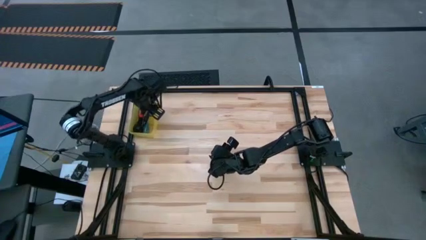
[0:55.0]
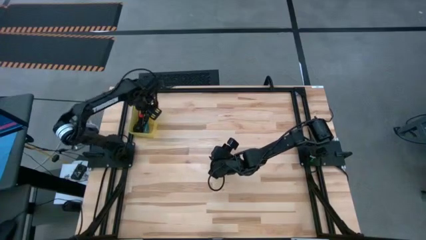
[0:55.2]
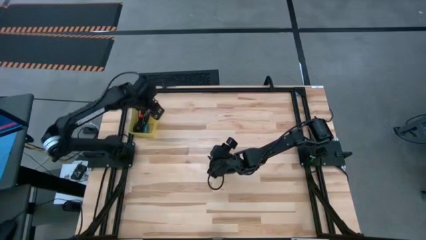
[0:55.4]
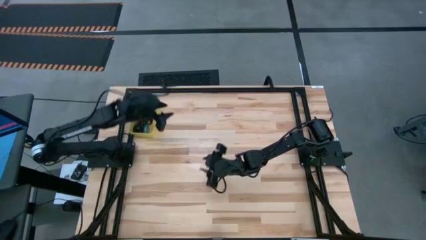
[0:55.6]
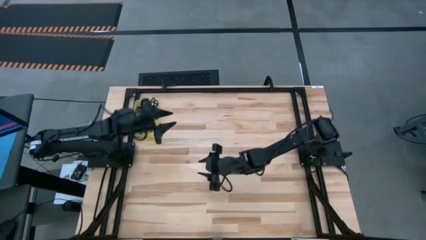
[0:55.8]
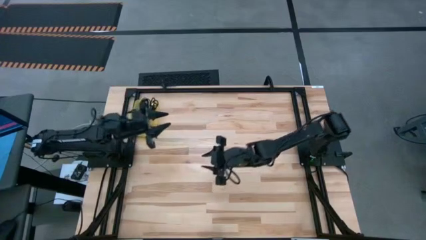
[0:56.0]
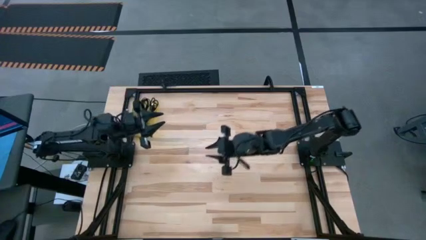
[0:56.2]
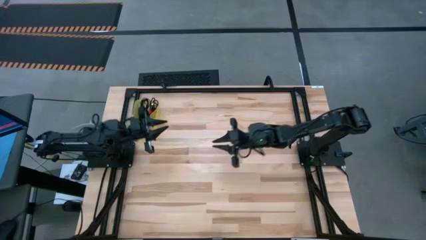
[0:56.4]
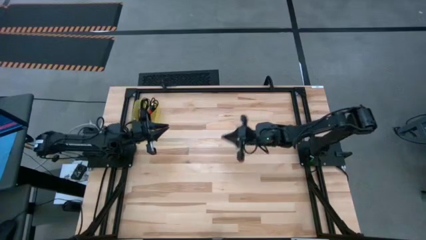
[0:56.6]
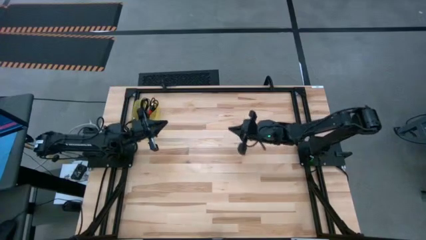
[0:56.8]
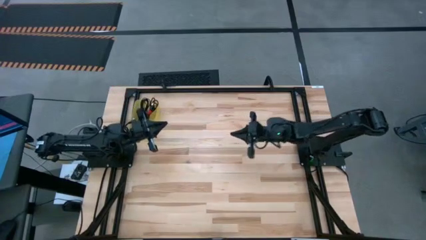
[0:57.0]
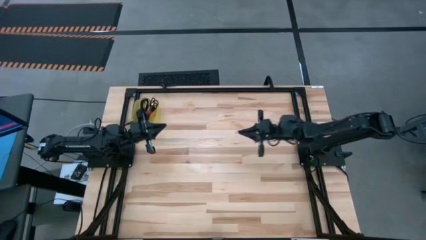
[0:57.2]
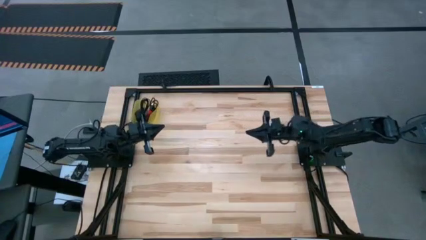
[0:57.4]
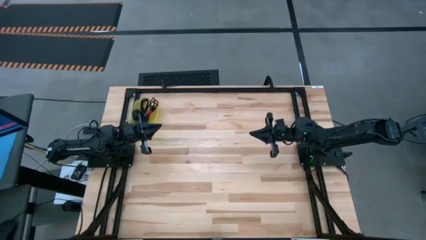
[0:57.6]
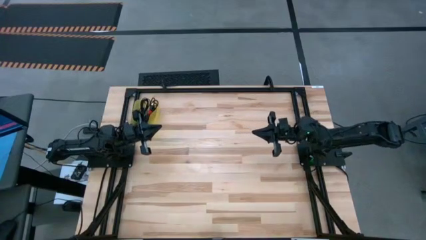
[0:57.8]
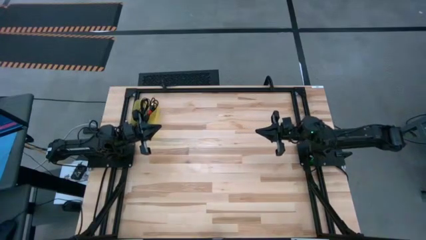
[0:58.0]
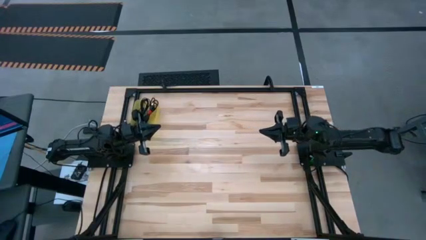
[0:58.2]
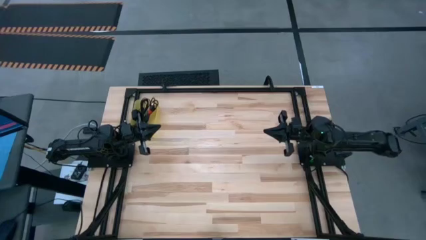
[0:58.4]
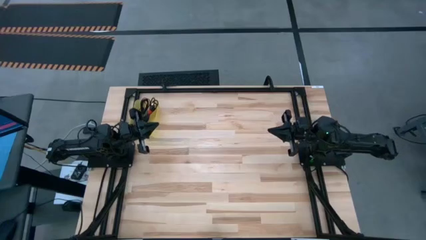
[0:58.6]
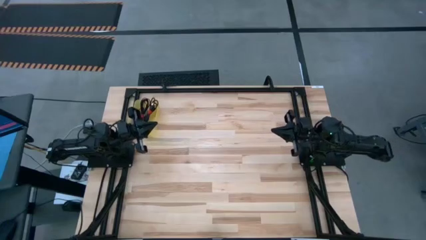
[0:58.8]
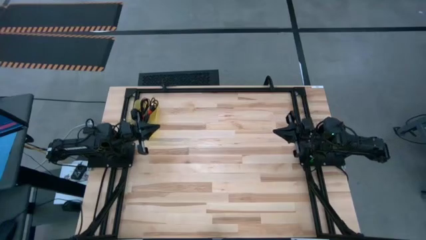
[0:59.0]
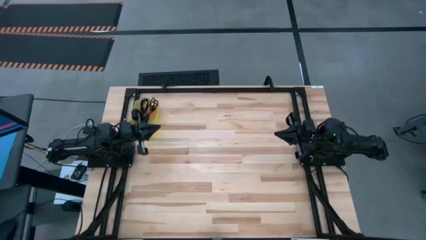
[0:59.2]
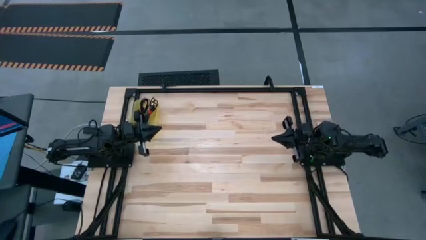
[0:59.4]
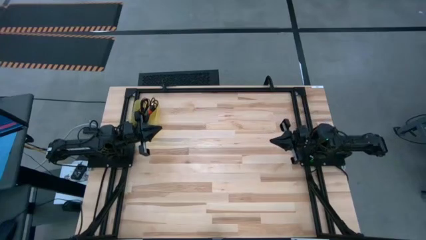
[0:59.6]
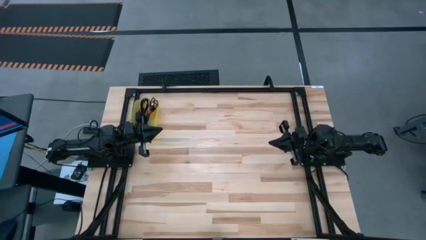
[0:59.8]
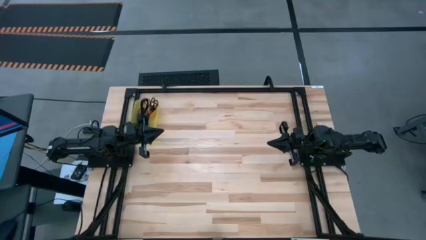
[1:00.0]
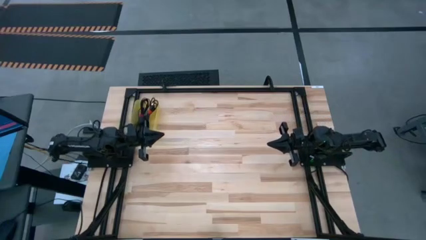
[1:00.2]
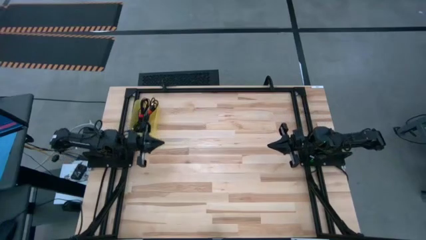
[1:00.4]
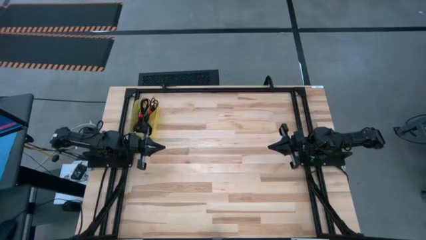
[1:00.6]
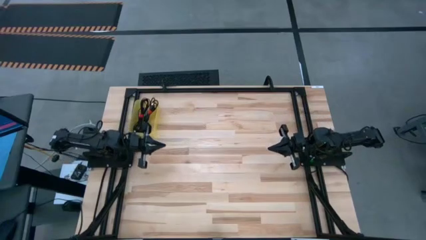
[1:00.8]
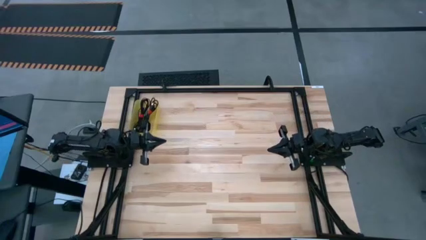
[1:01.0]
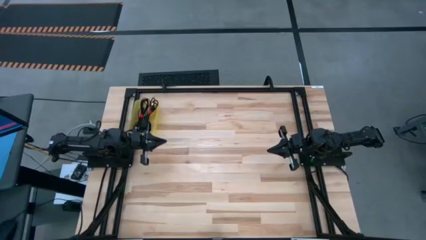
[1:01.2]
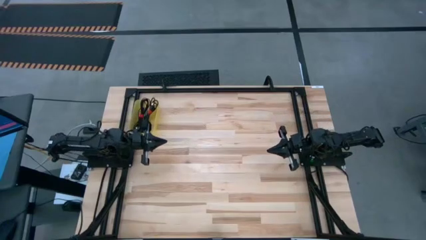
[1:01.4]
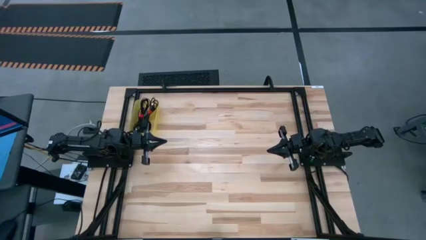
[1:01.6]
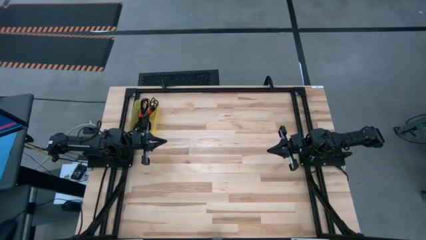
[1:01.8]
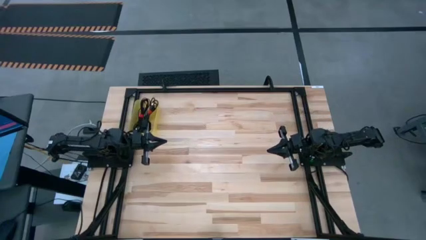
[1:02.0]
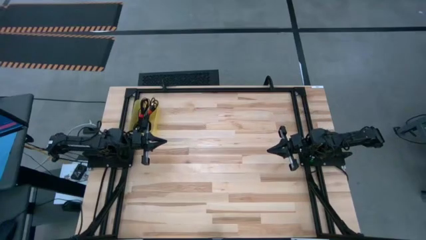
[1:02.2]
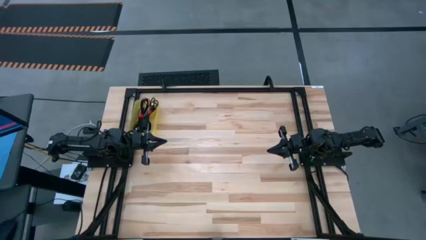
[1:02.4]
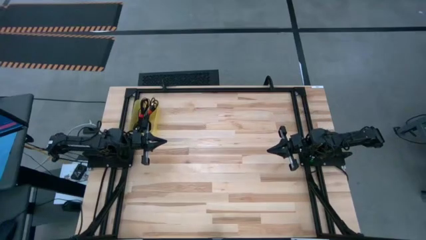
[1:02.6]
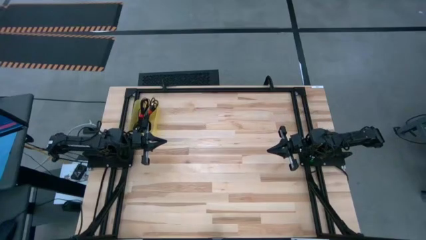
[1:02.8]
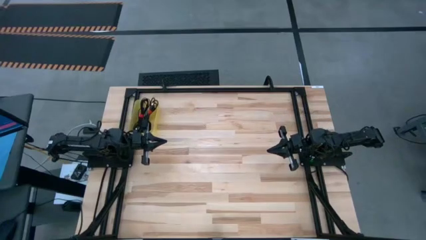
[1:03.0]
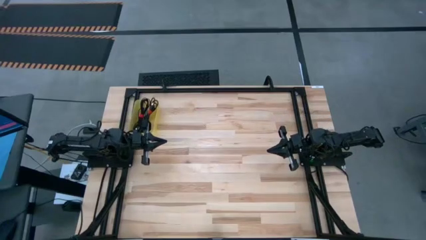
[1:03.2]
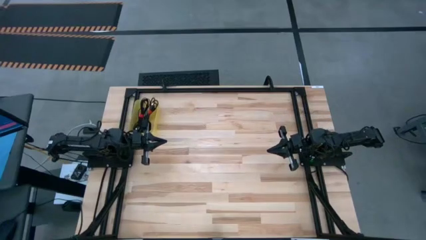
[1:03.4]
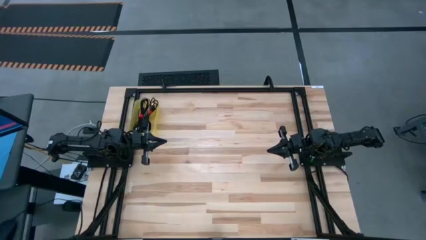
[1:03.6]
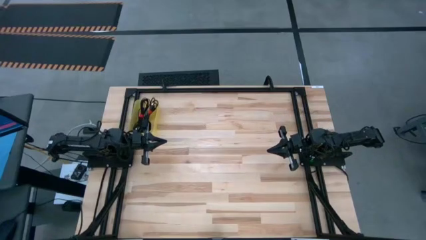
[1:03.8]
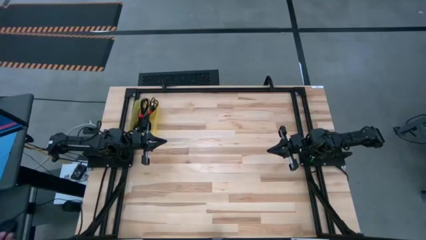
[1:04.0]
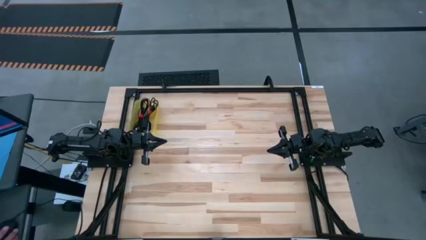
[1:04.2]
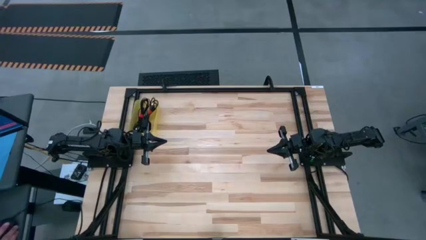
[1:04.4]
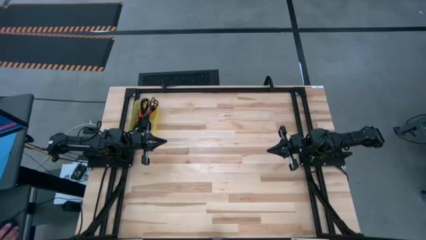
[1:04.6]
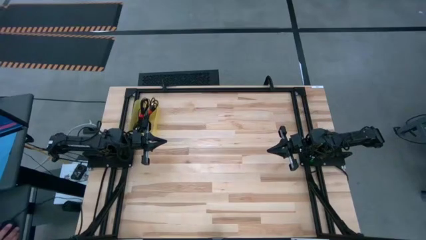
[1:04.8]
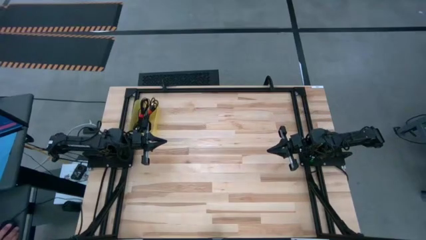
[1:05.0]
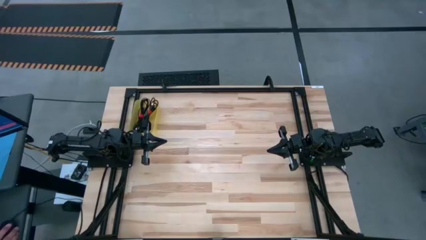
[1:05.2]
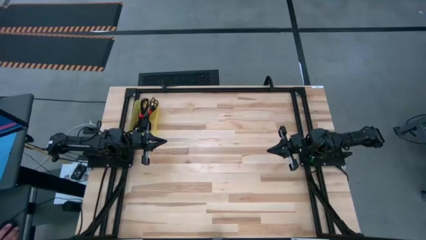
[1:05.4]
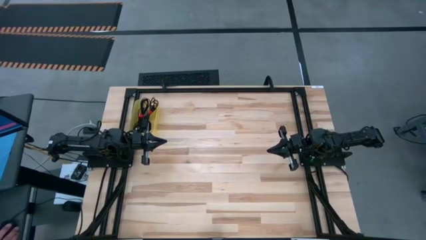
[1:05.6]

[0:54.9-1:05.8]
Task: Pick and place USB-C Cables
Return to Home Position

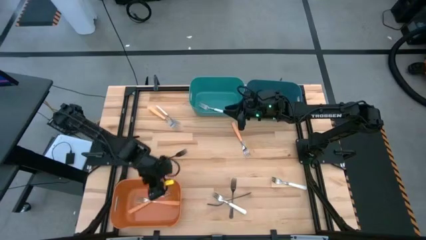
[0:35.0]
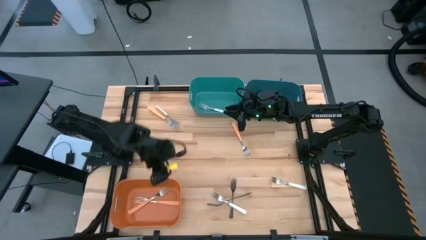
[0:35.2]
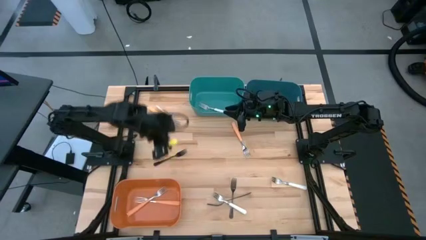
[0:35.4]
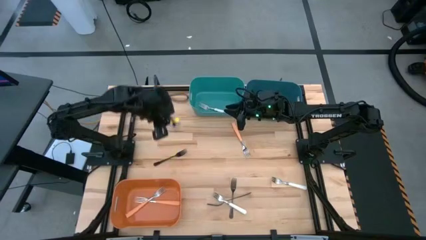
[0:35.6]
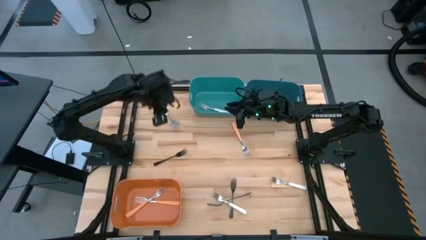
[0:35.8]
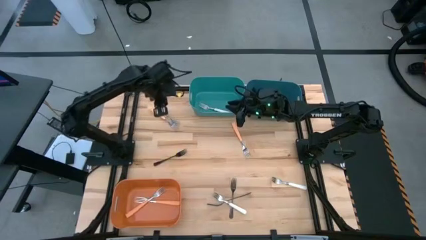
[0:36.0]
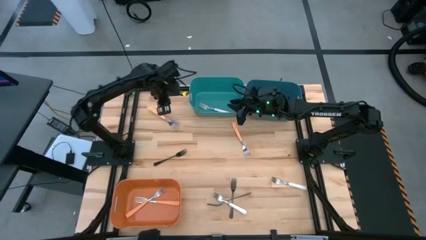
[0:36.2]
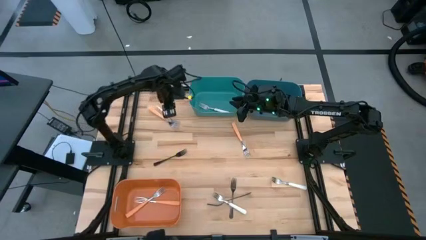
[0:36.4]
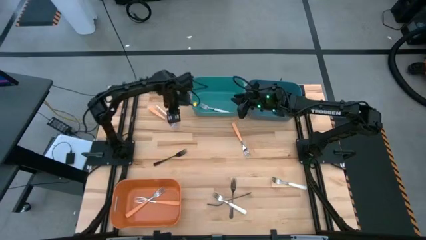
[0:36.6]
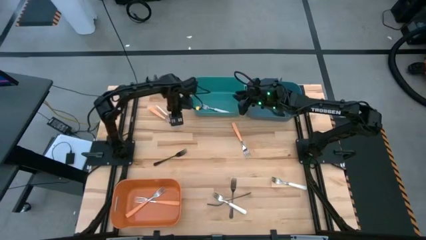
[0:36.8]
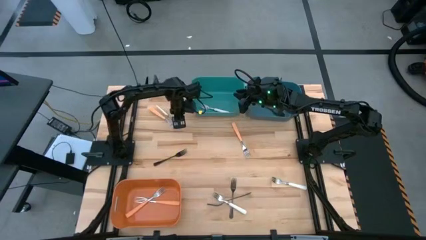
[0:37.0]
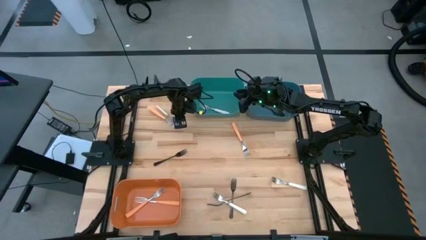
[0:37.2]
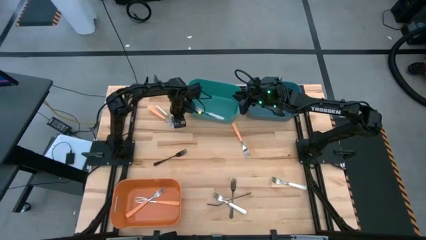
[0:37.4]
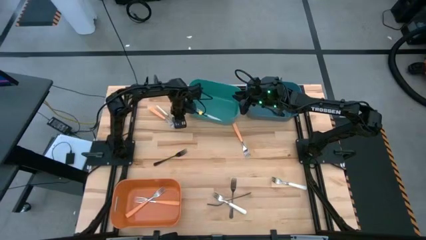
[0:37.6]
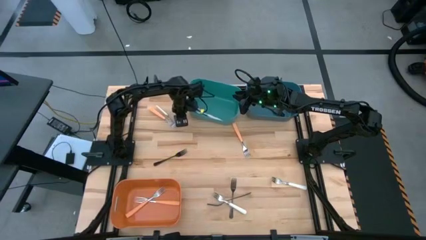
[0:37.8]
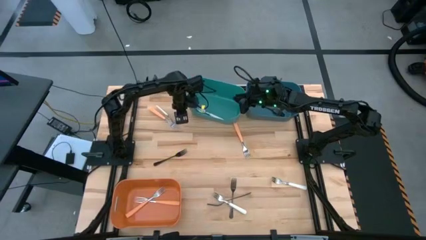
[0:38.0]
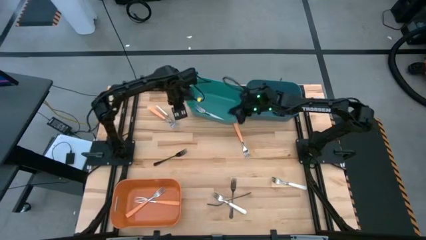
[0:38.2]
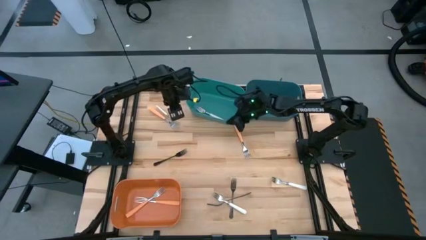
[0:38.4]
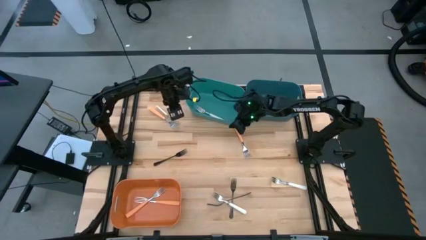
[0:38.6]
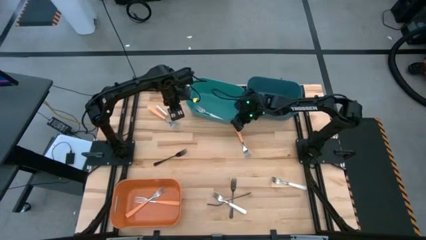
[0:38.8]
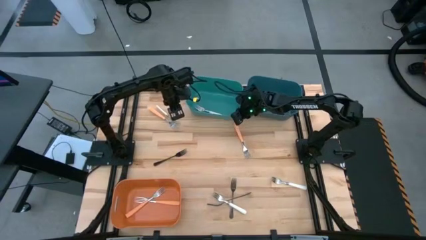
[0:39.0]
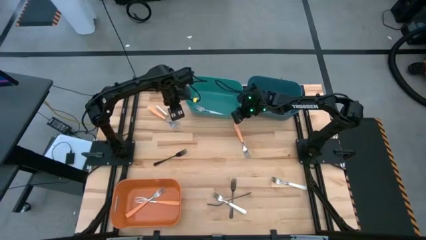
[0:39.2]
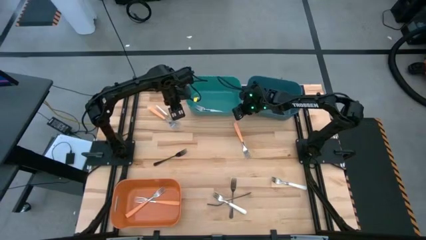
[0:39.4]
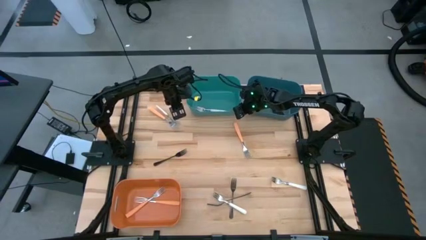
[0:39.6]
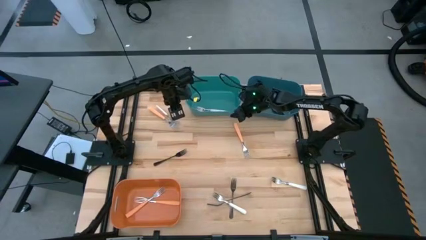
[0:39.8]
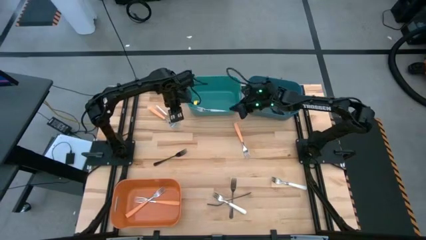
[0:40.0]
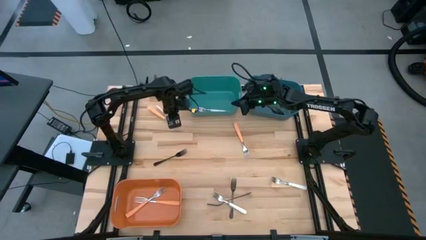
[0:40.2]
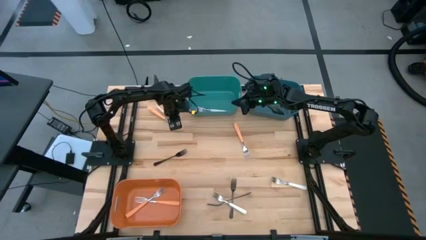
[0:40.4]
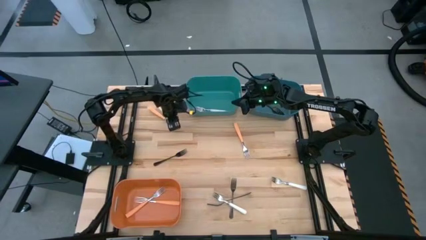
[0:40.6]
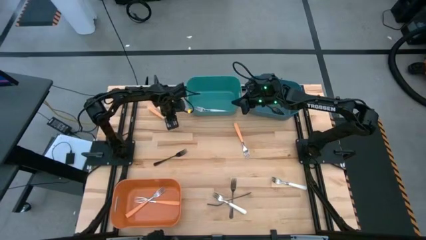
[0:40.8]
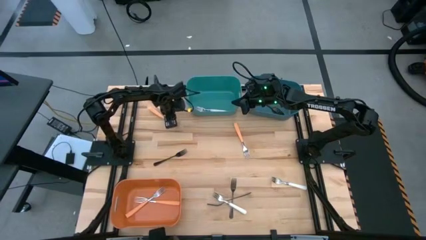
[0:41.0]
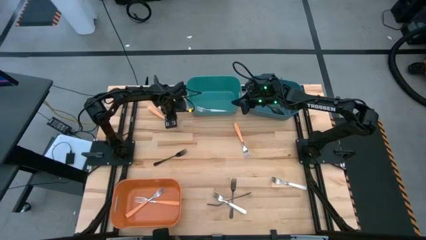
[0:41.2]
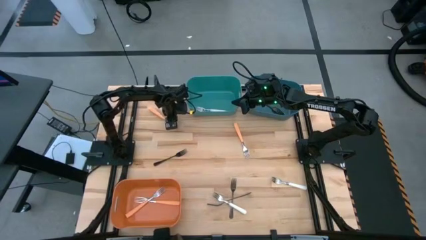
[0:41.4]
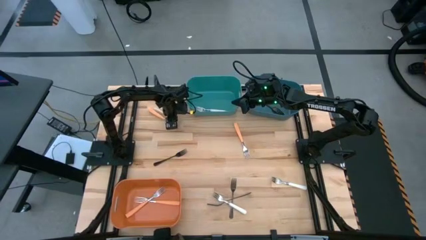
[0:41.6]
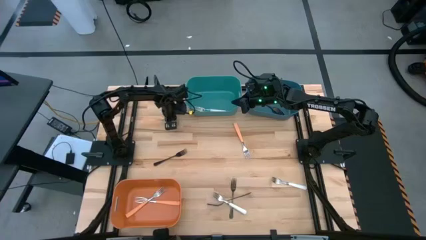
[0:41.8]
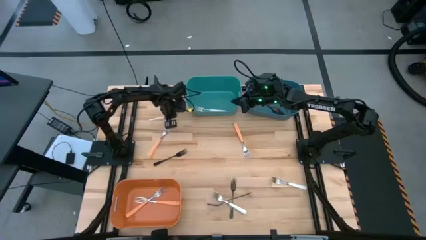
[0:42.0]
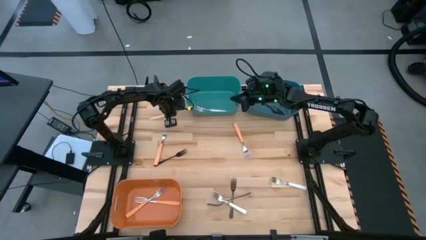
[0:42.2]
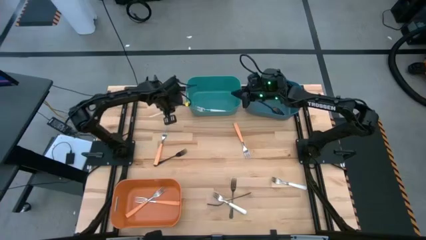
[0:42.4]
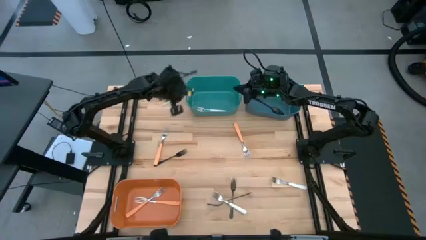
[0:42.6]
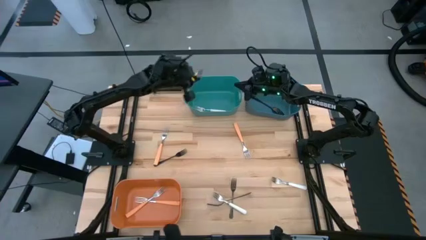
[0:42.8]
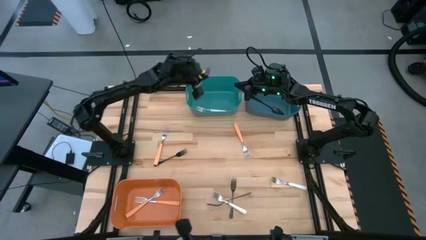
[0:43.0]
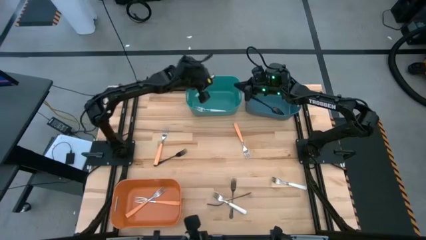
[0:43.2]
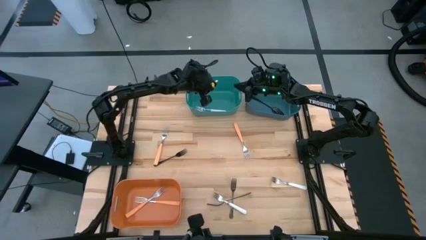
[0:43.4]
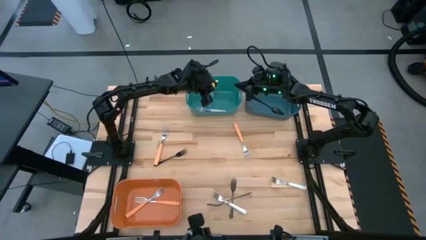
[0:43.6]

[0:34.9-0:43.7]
Task: Sort silverware by color (type)
Put the top left white fork into the green bin
